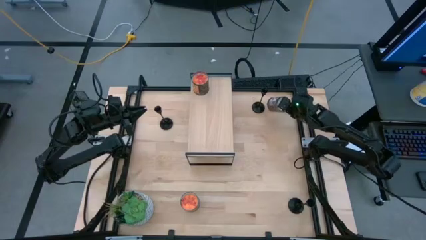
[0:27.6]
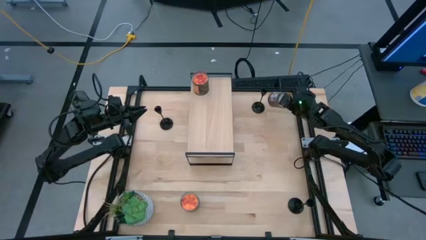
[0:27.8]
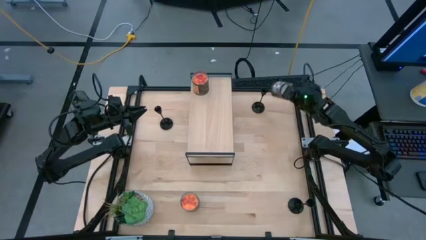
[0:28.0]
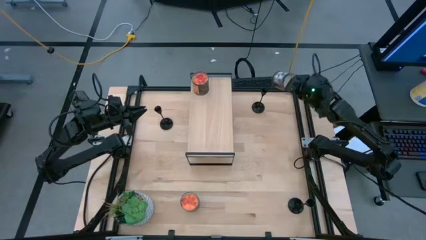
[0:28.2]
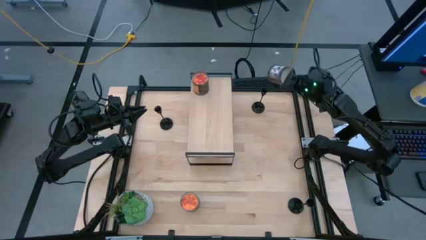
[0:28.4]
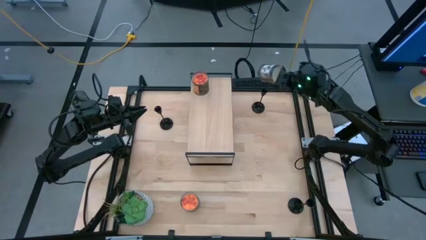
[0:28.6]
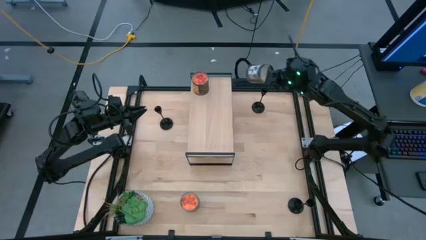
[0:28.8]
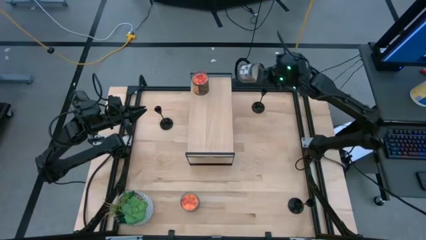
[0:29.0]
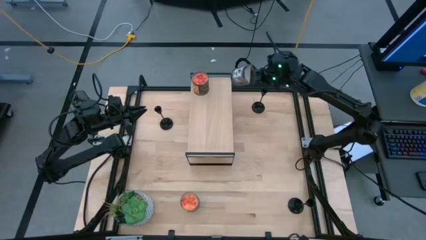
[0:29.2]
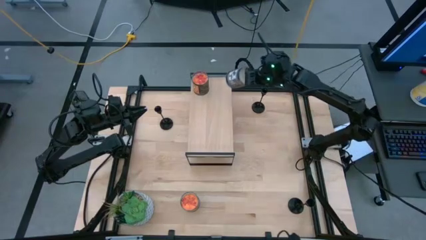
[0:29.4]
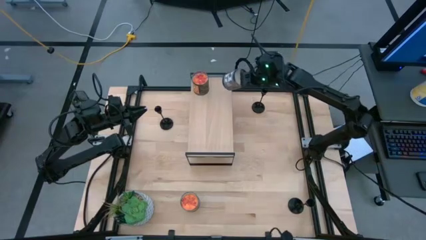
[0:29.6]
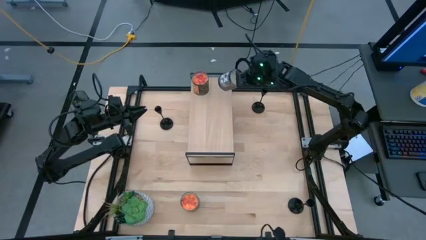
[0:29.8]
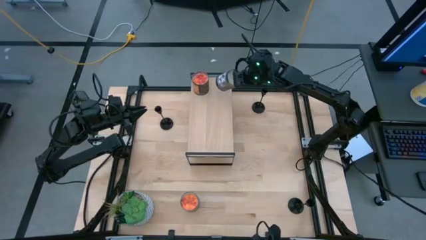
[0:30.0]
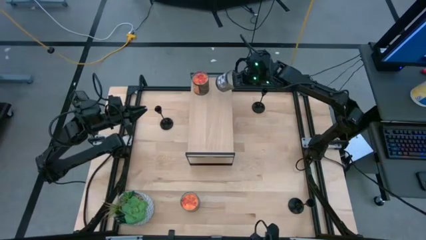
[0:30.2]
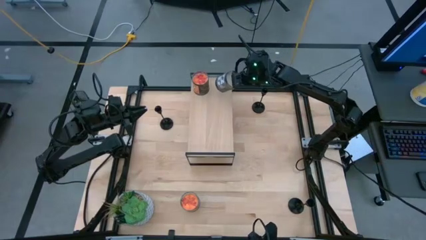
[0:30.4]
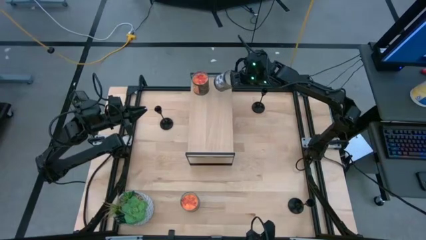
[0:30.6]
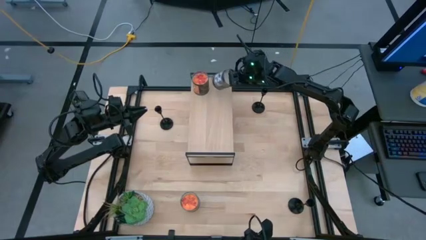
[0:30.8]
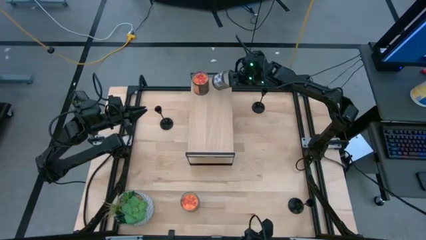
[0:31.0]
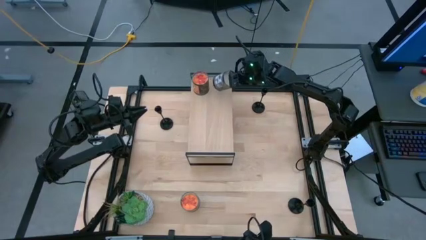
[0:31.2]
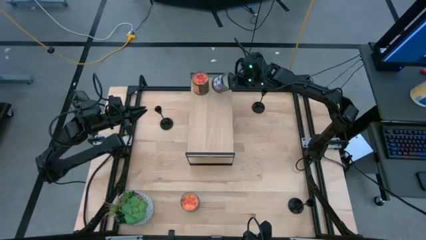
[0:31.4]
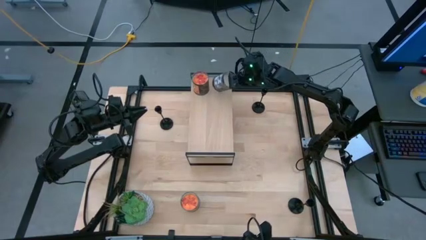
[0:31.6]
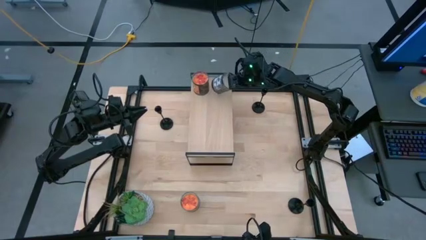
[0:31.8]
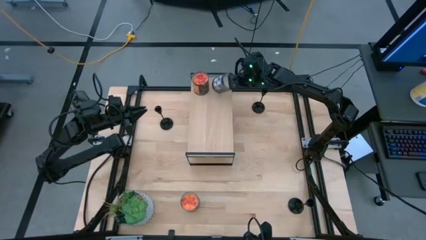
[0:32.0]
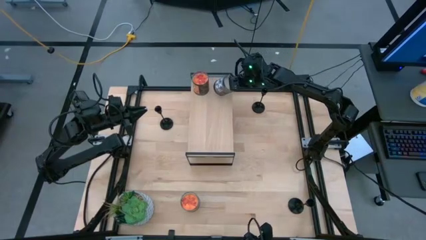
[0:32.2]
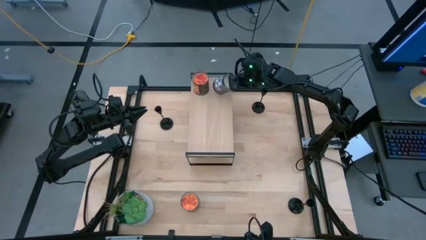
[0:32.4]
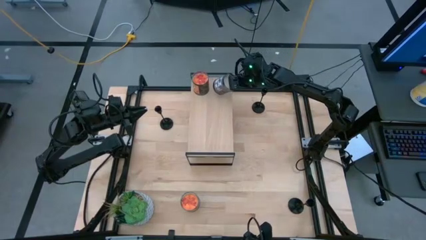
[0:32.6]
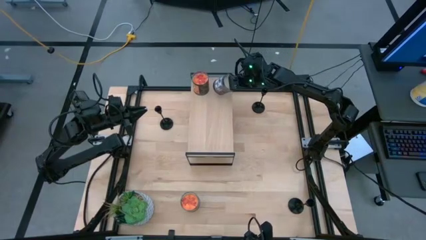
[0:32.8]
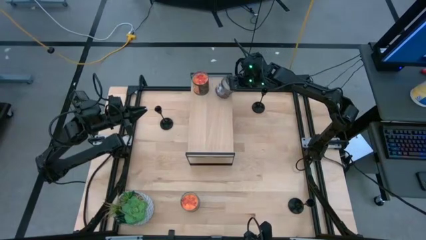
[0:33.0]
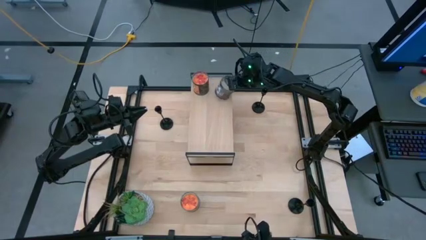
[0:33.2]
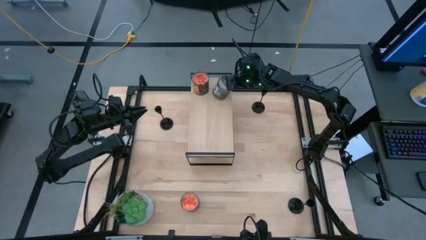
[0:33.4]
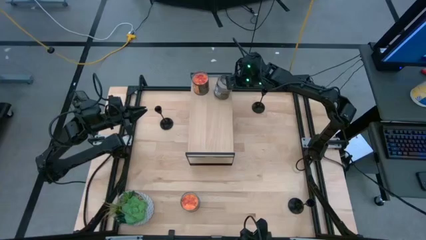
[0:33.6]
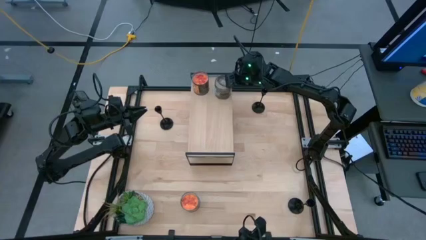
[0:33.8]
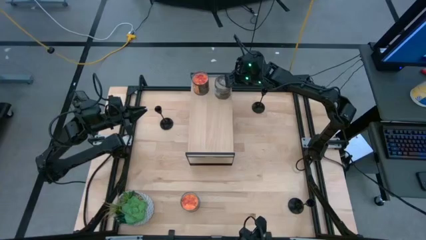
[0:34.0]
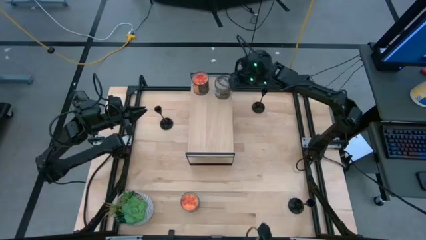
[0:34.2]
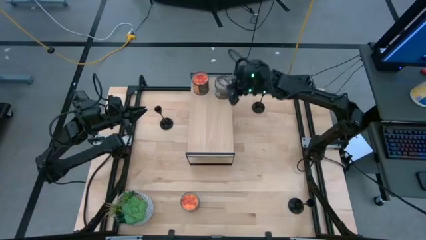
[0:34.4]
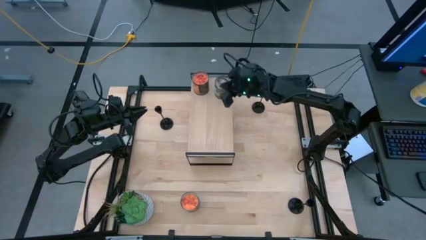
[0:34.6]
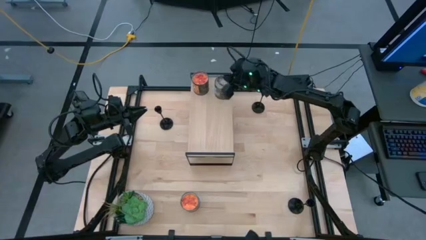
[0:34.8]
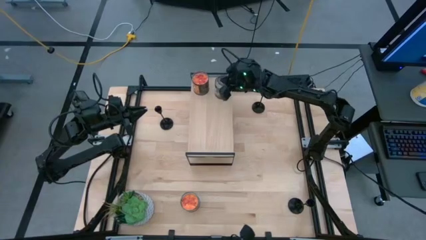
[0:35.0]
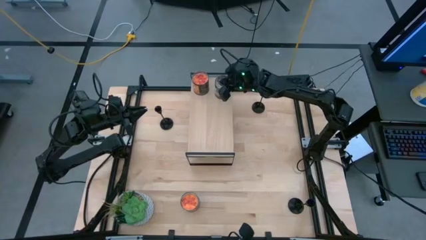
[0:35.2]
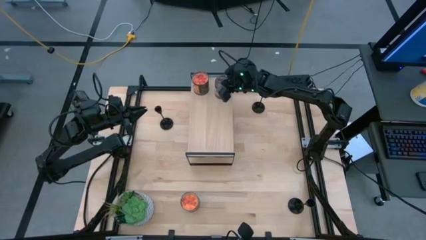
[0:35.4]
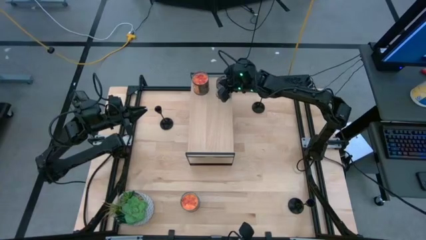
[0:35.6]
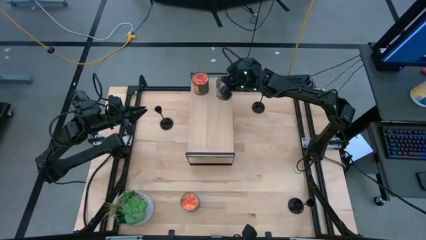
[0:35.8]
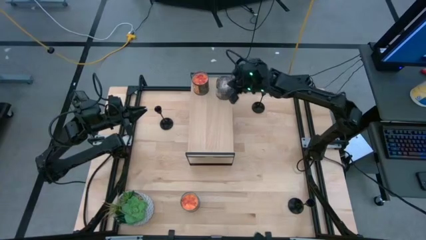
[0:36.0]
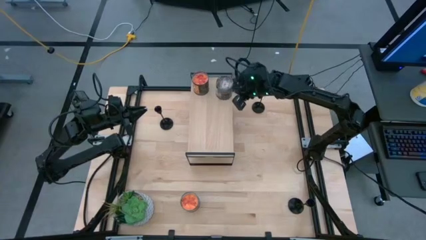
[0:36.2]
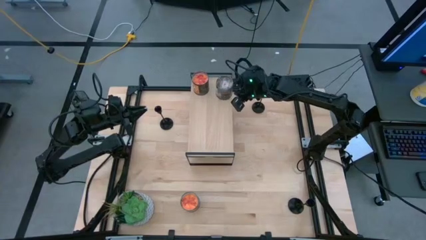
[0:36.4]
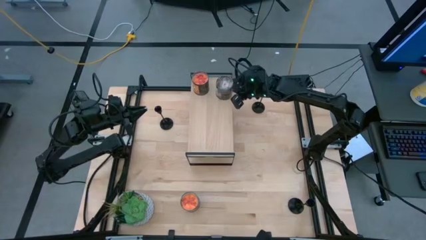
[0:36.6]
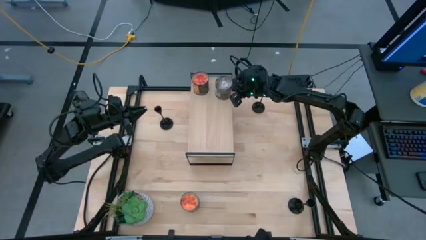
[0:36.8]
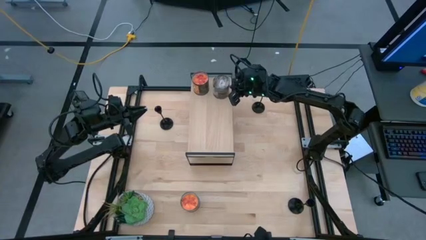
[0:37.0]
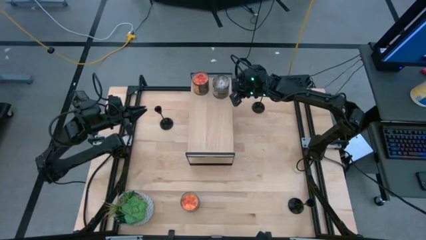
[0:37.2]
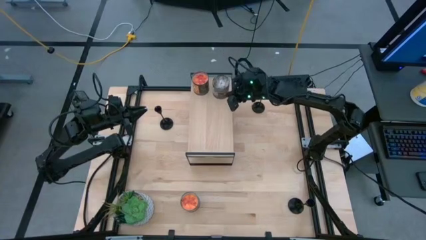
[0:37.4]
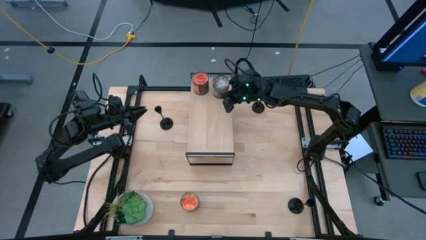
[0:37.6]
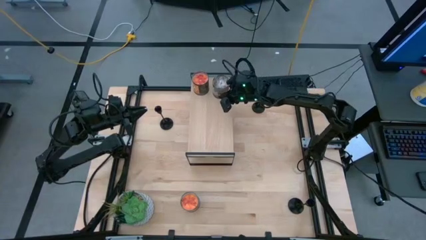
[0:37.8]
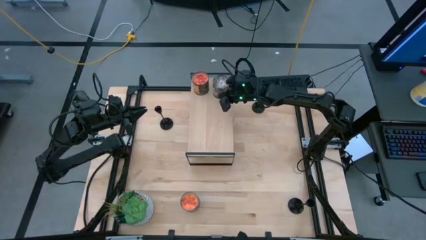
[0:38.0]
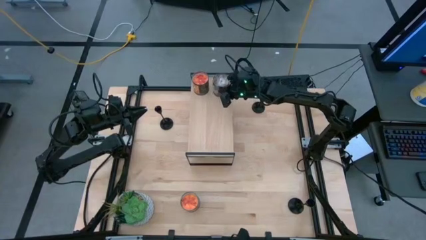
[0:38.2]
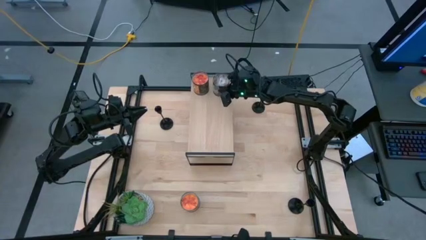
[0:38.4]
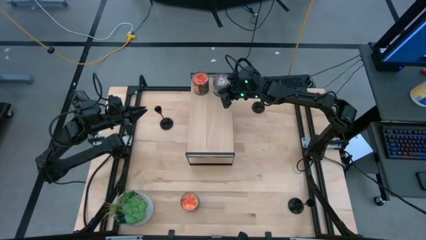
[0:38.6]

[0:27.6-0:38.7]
Task: Pick & Place candle stick holders
Align the brown scented candle with the orange scented candle on the shelf

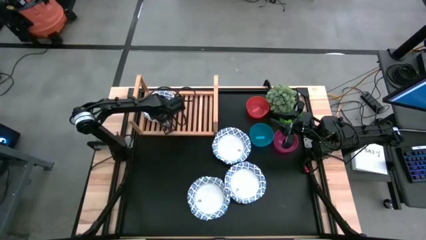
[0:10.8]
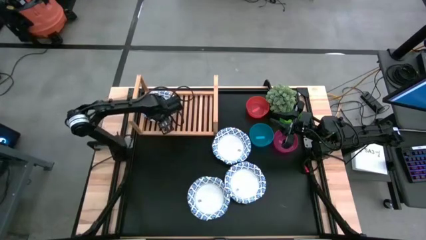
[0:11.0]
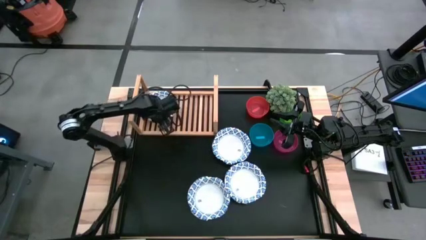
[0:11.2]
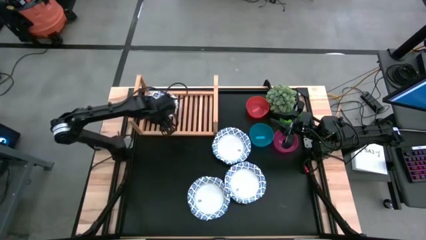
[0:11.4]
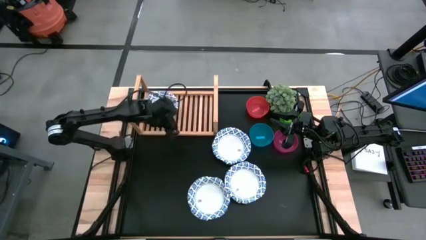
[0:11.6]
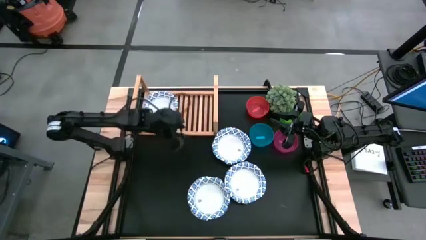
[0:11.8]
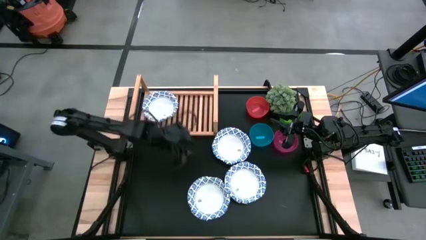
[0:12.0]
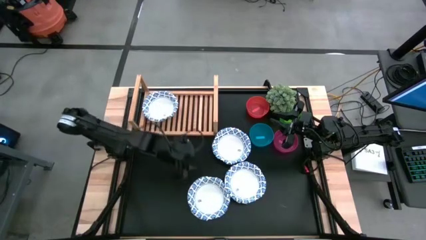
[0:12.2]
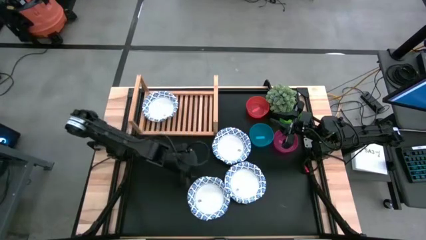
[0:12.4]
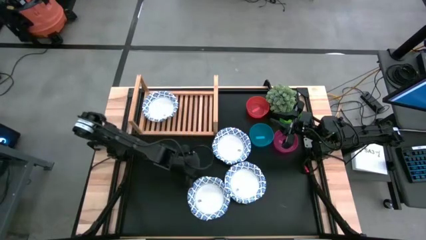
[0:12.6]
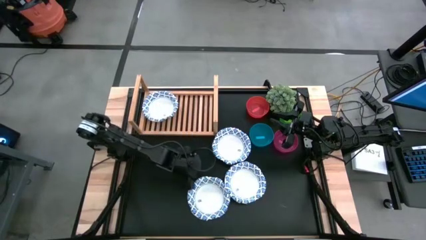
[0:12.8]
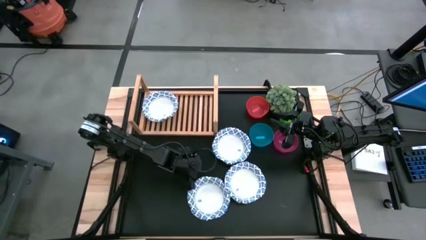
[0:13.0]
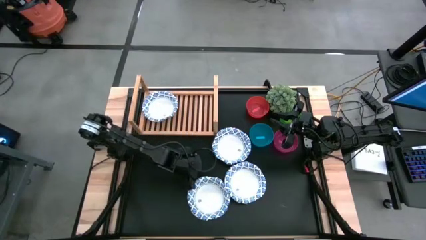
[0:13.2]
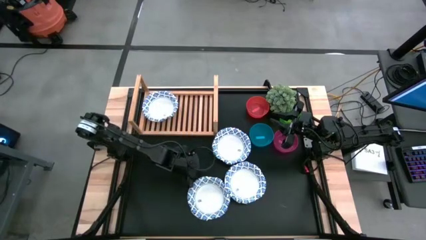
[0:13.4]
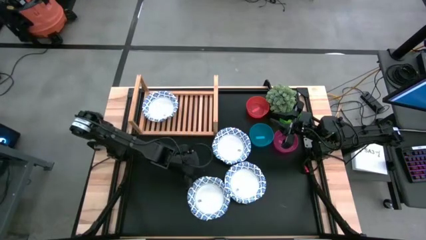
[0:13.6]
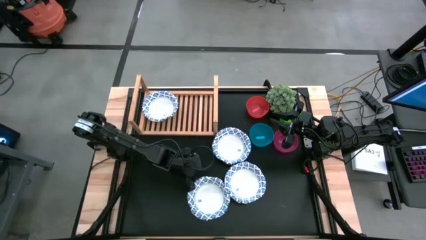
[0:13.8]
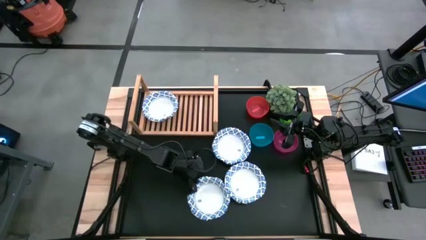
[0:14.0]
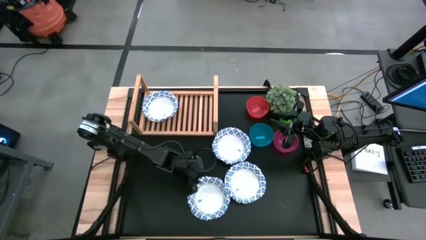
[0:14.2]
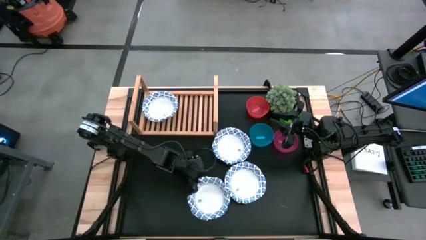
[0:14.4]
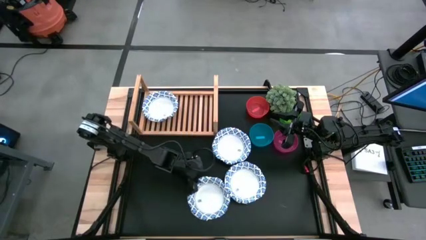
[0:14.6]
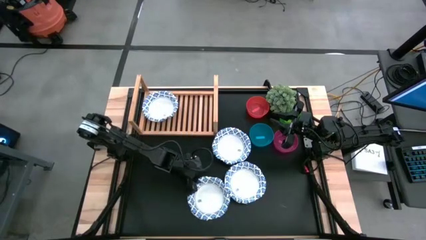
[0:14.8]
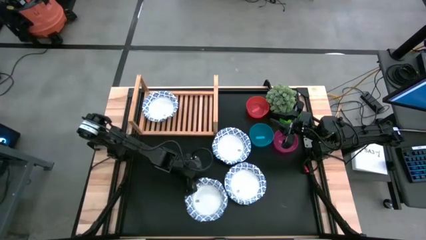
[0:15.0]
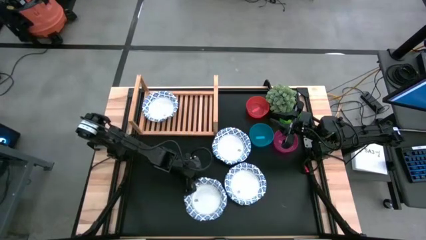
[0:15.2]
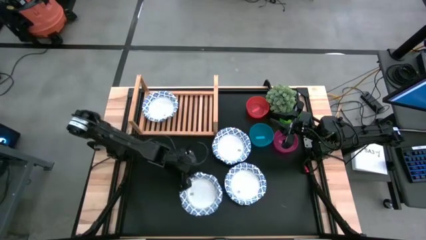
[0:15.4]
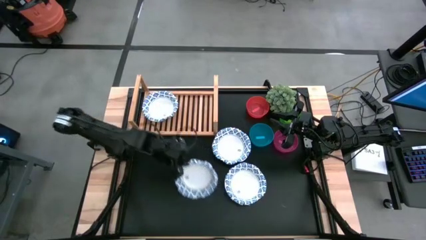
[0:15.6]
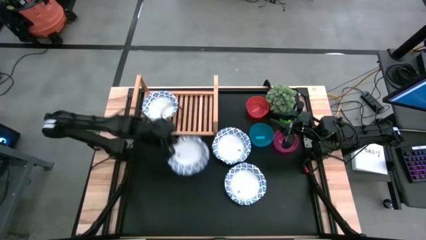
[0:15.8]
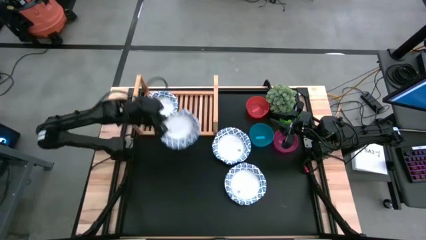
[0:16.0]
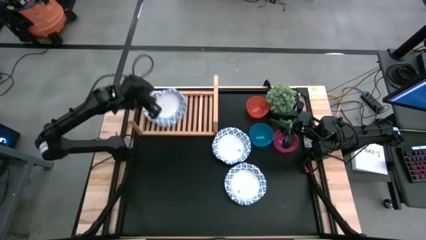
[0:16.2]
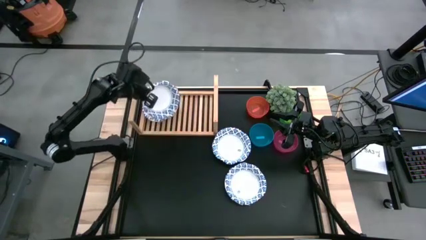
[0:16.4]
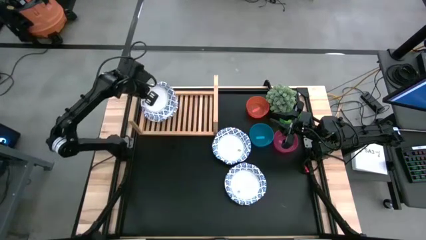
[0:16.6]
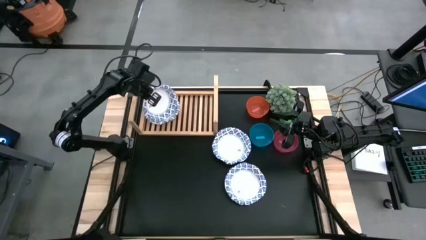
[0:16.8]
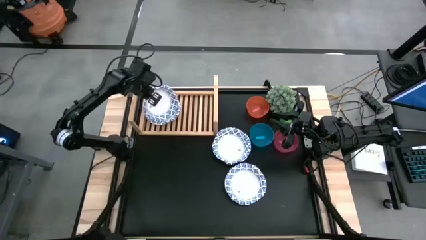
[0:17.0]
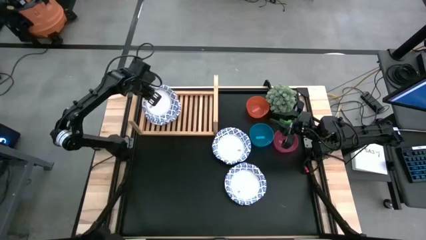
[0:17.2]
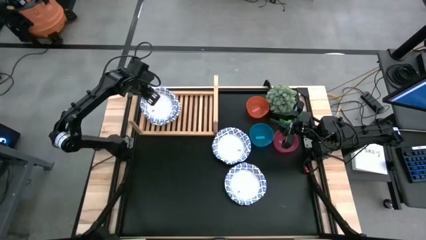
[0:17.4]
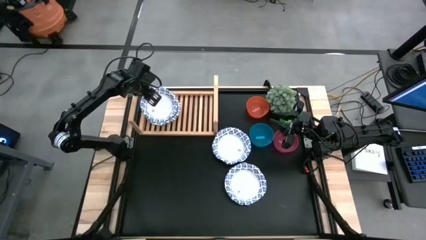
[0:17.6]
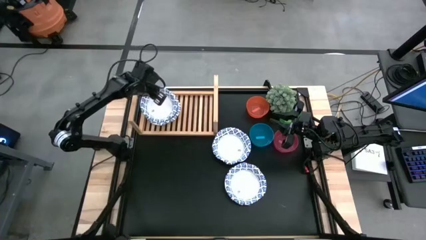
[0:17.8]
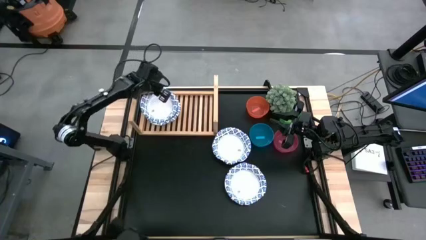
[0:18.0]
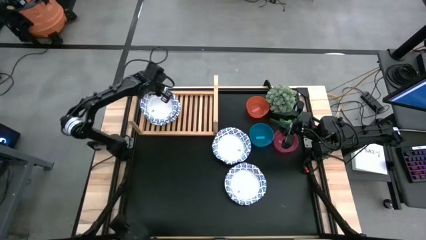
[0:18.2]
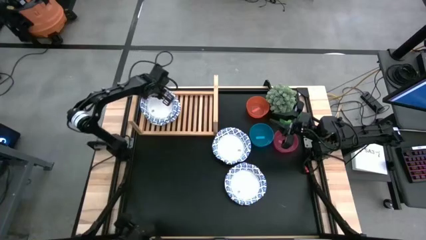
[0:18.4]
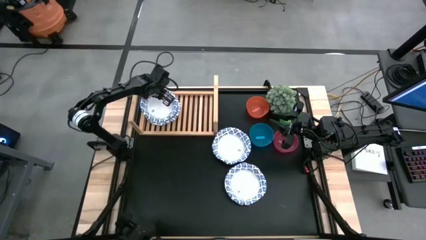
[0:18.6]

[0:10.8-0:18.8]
Task: Place and stack plates onto a shelf
Stack the bottom center white and blue plate on top of the white and blue plate
